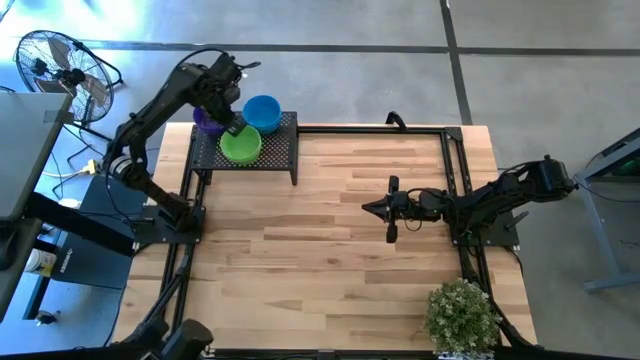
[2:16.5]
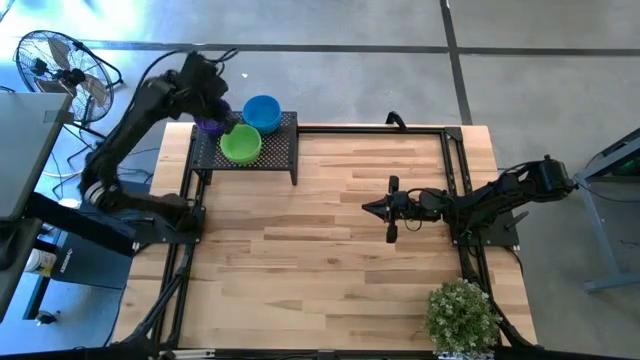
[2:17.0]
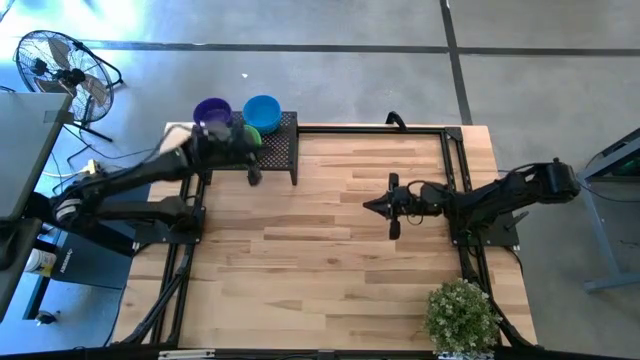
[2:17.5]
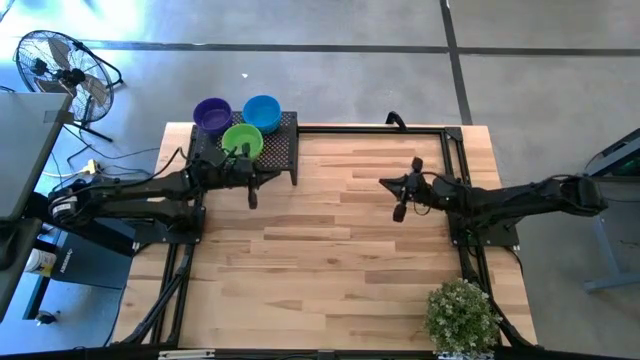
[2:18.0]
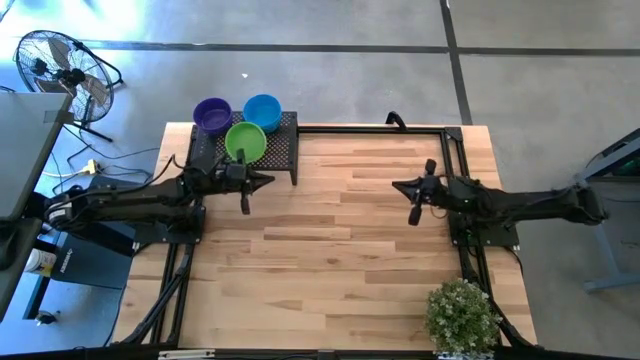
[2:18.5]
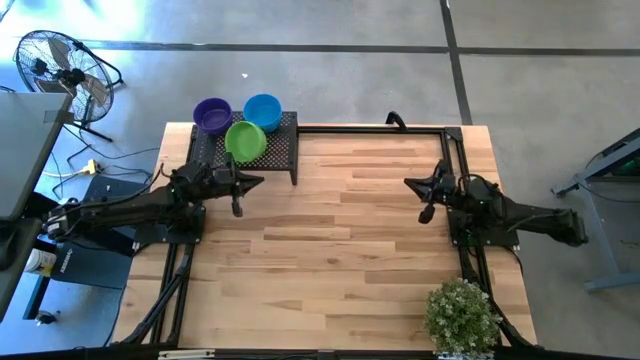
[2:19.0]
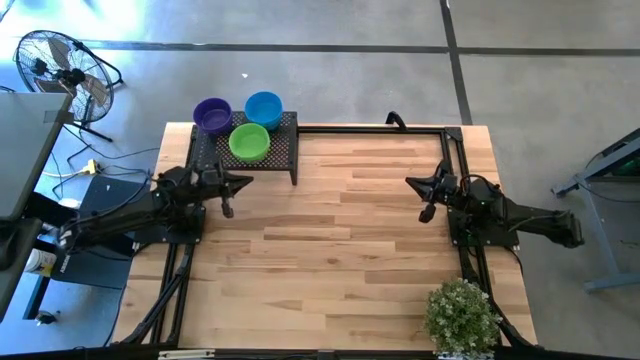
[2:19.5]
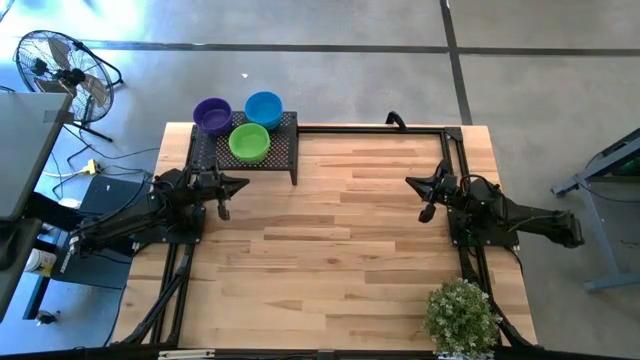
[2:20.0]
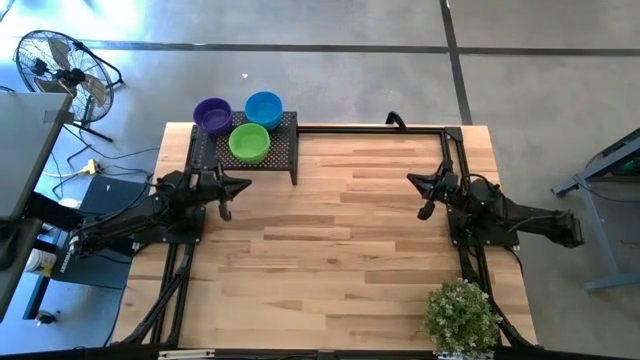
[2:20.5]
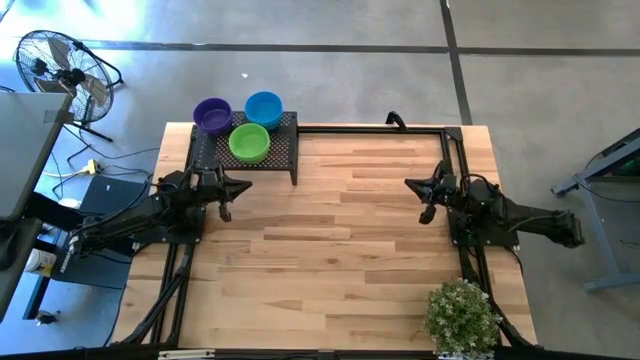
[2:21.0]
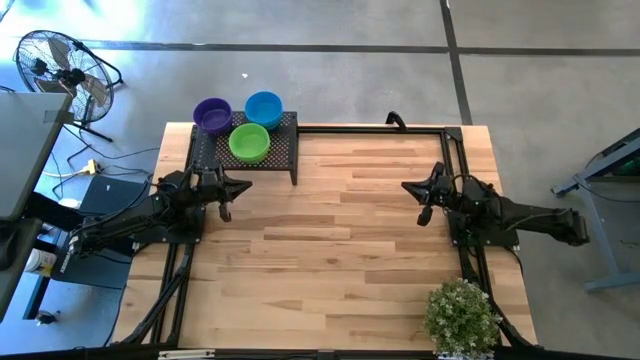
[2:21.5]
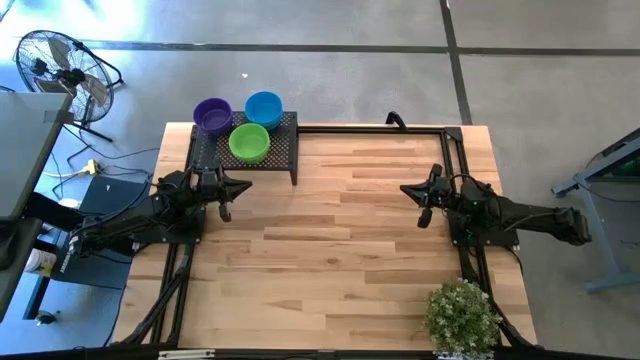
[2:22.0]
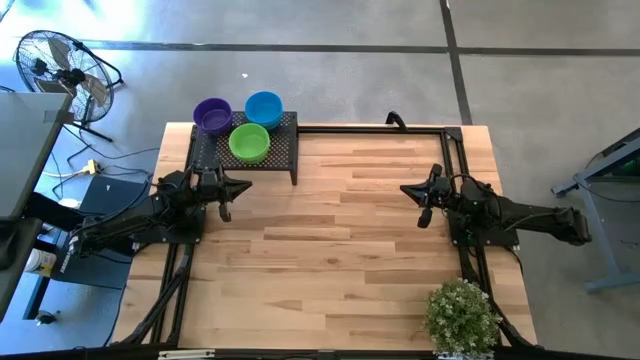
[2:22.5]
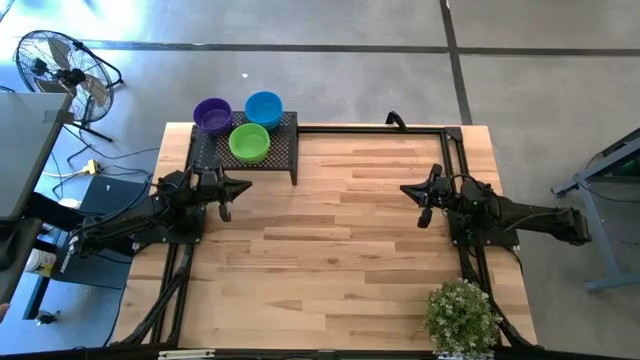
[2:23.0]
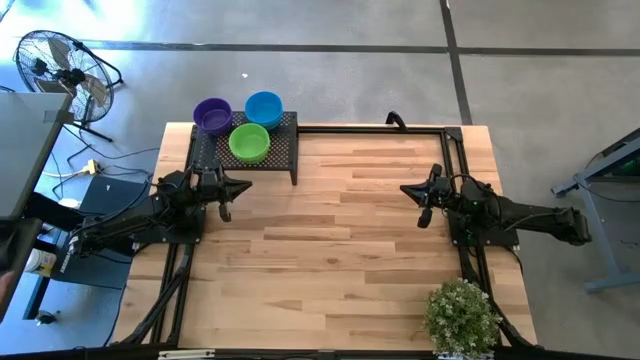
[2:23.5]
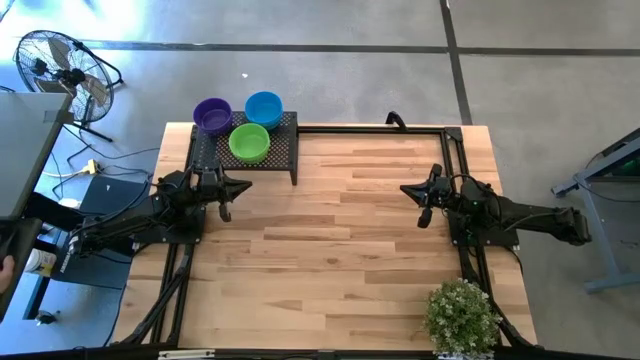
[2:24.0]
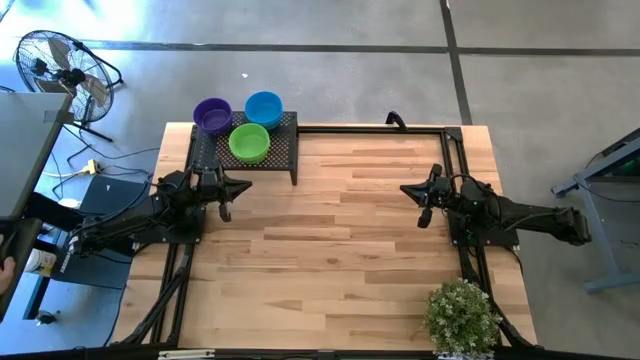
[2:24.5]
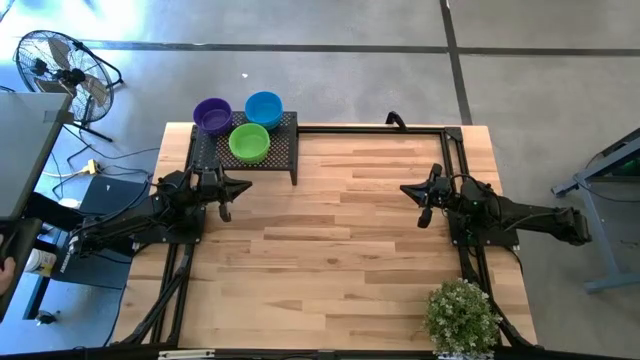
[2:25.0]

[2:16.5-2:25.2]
Task: Pick & Place Mini bowls
Return to Home Position

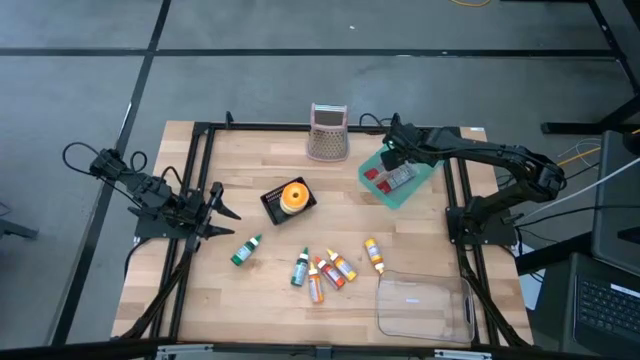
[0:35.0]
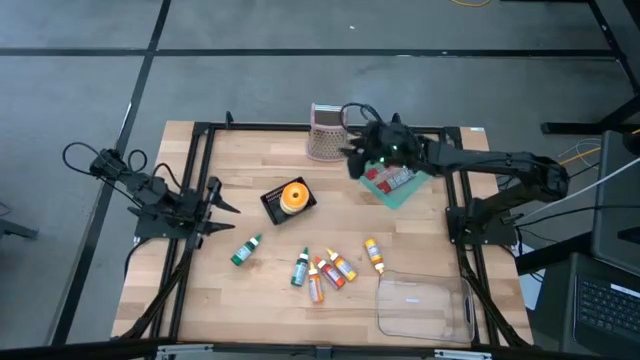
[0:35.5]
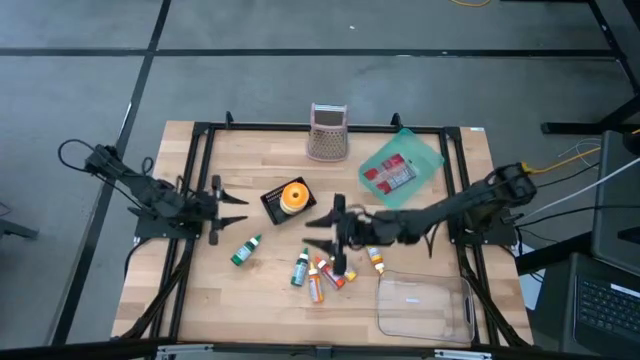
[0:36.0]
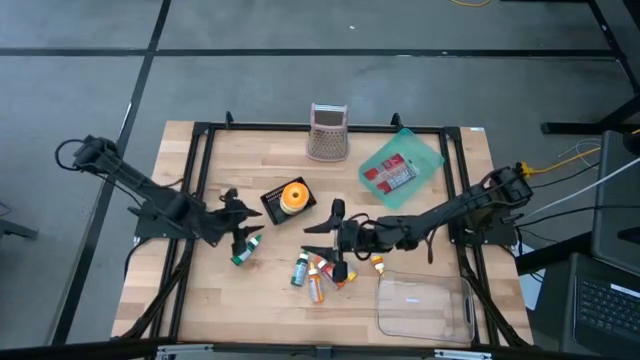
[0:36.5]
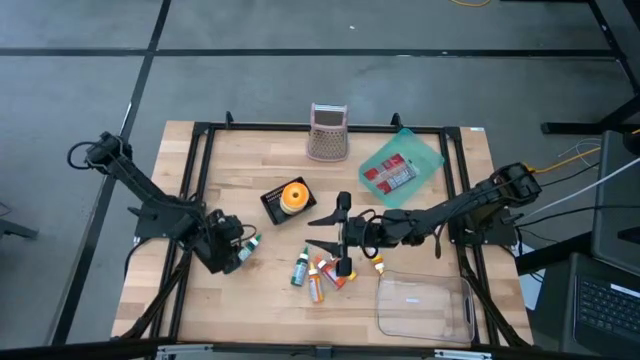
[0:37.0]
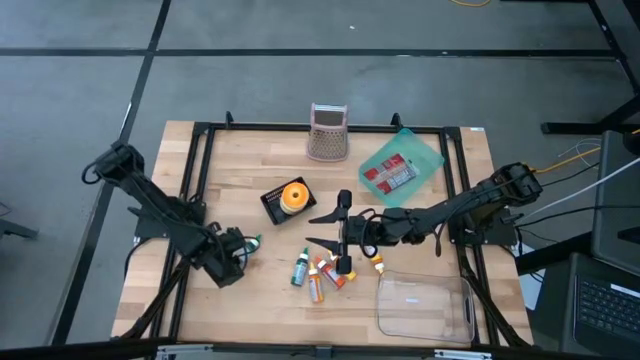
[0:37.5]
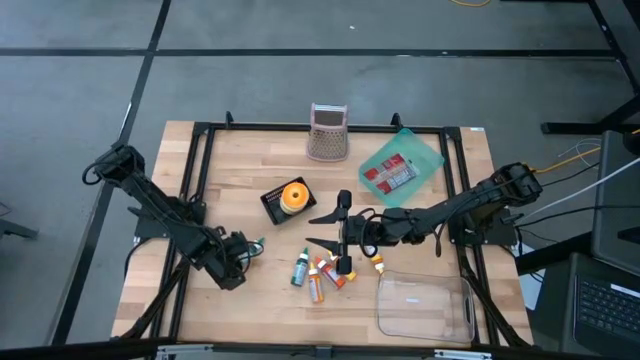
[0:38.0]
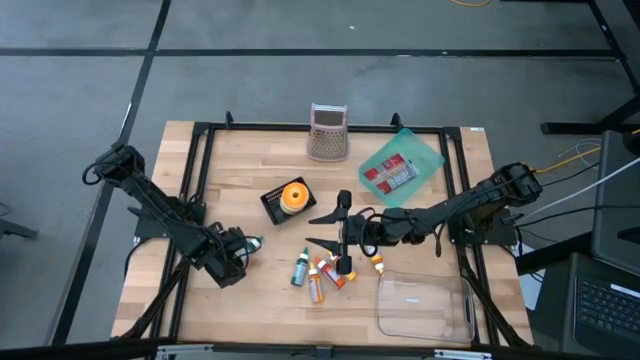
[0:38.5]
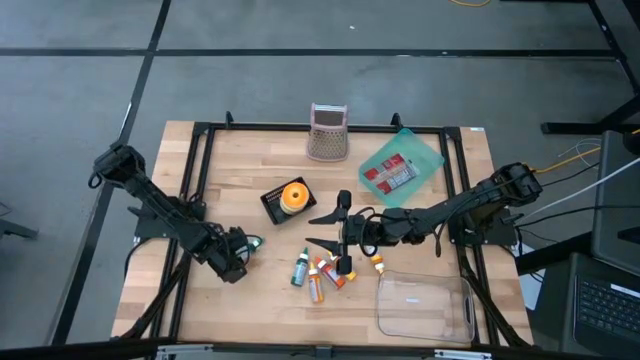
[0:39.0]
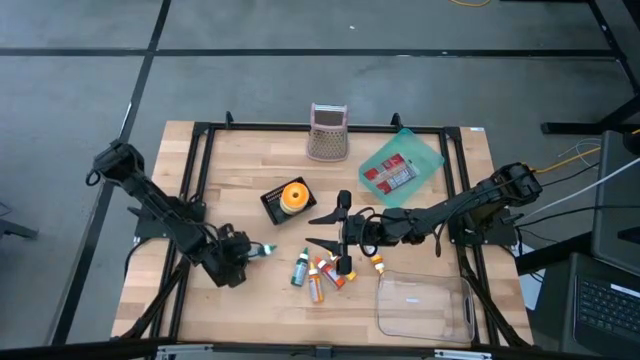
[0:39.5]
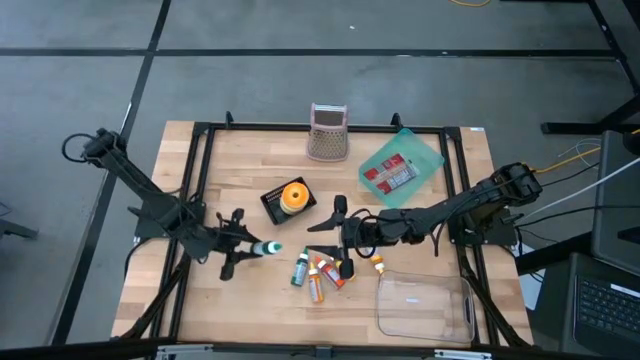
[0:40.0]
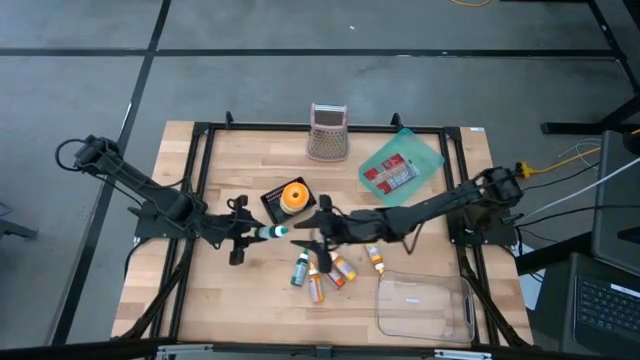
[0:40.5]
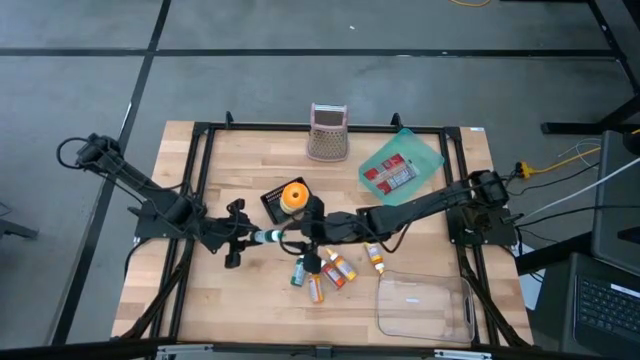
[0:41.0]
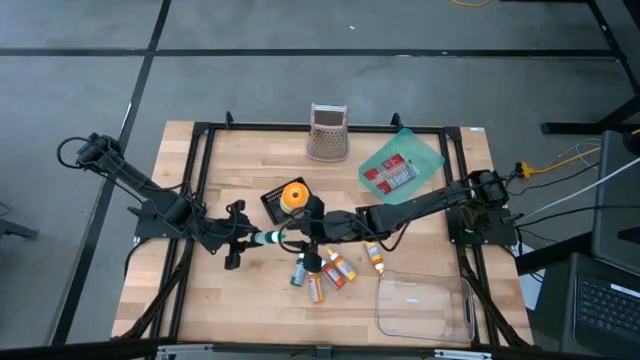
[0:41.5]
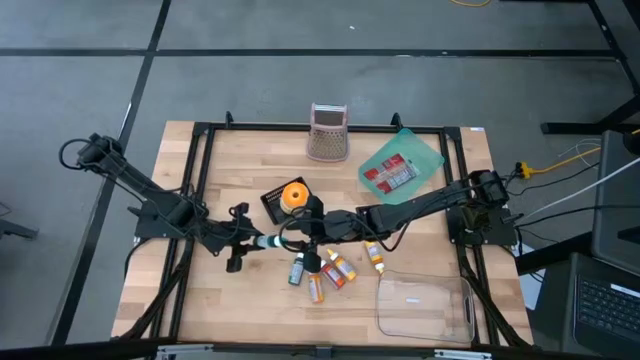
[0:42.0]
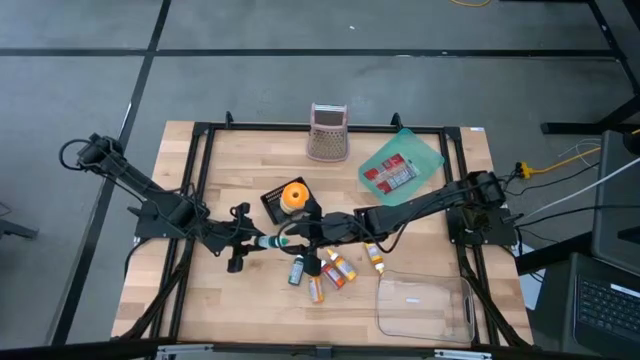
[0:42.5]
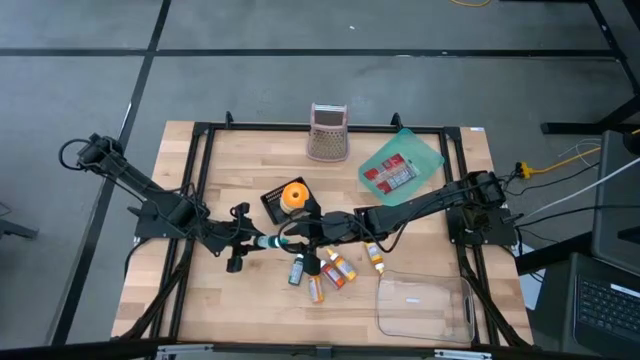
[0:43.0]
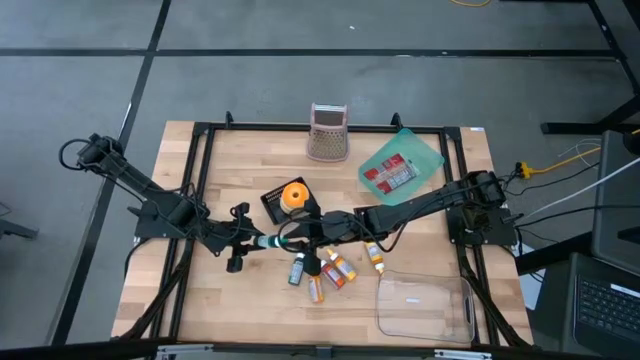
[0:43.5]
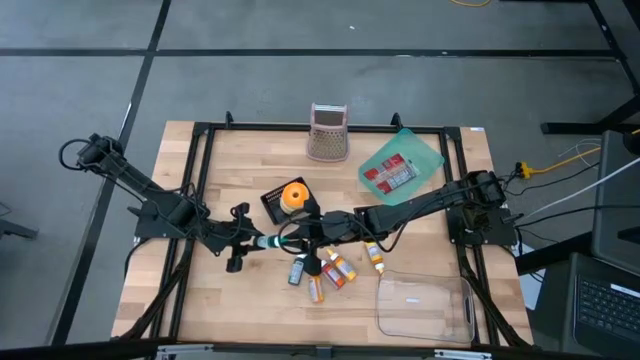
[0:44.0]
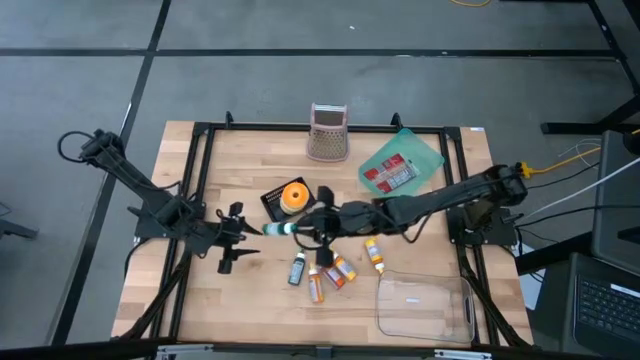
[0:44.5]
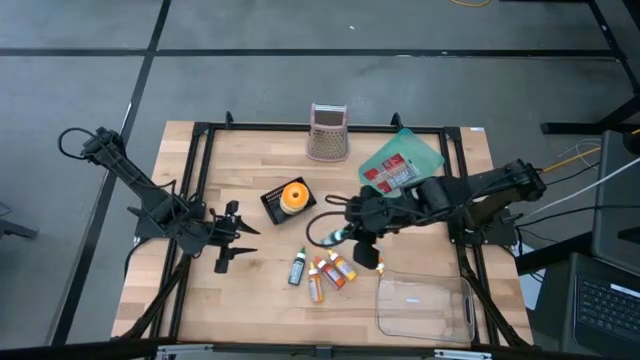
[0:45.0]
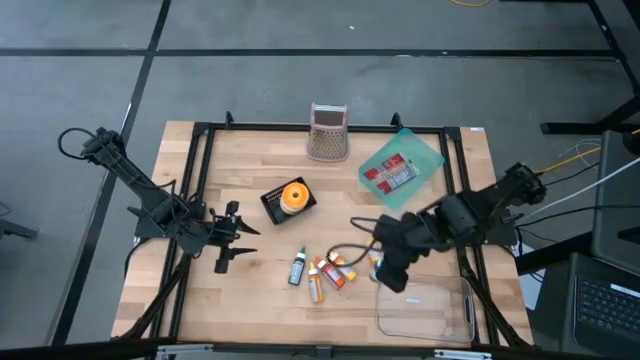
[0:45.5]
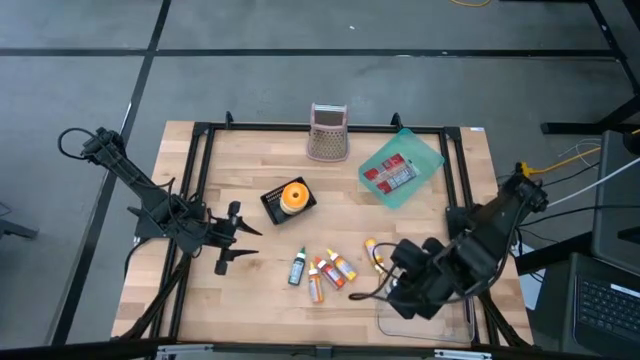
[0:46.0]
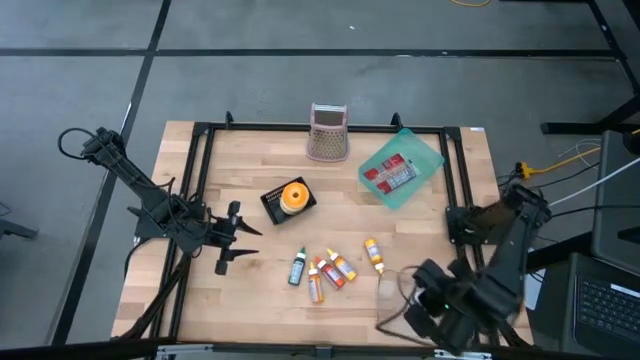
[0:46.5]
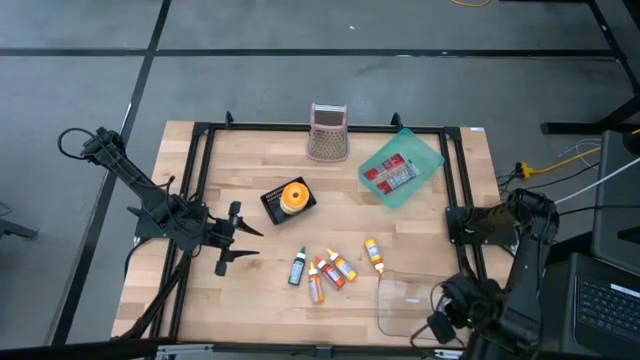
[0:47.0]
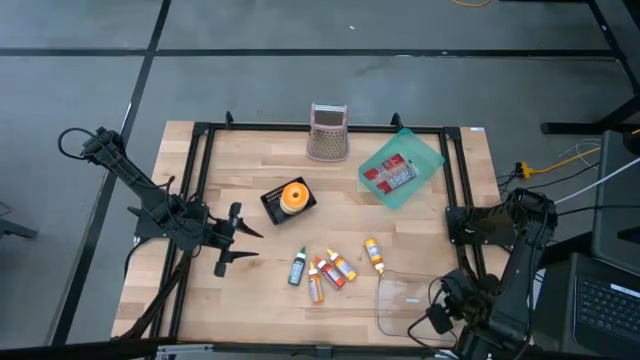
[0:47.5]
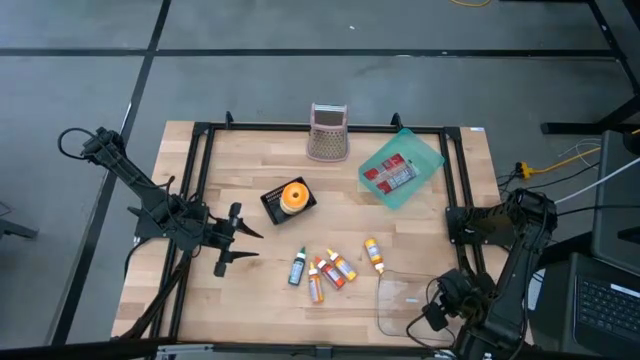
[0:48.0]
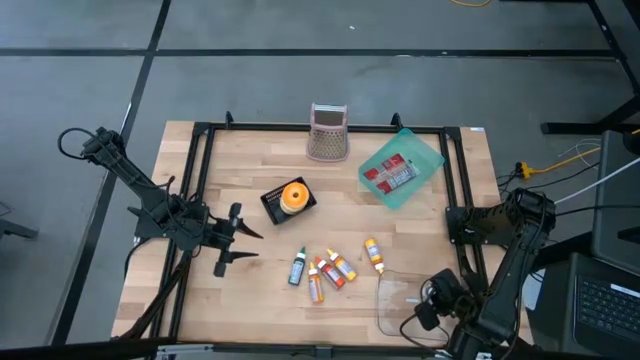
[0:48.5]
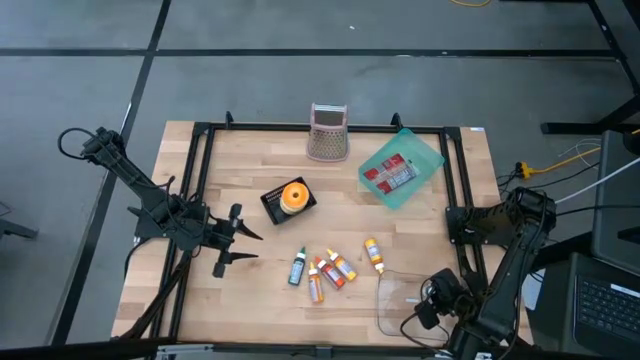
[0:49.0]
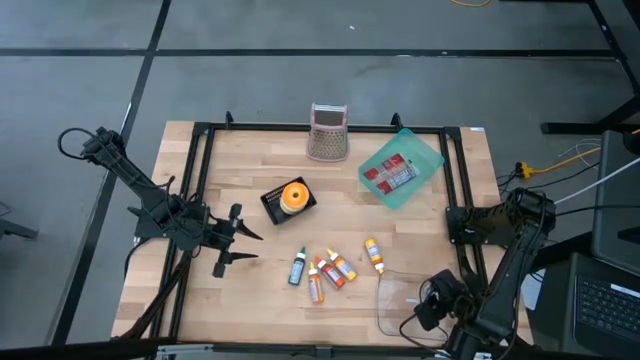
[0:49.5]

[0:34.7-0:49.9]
Task: Pick & Place Food Item
Put the left green food coloring bottle into the transparent bin
